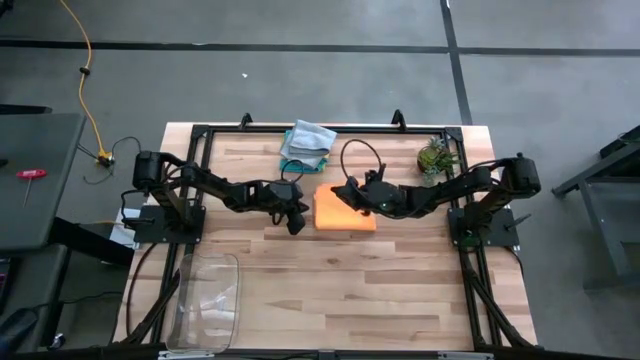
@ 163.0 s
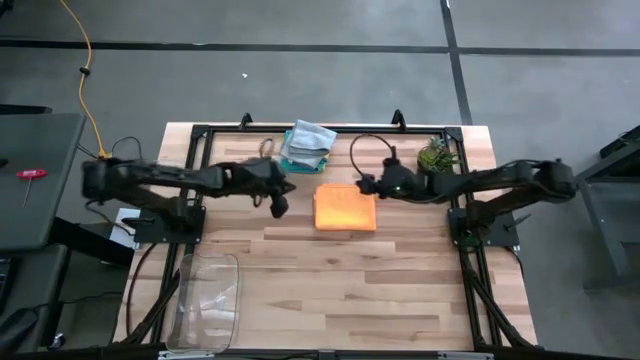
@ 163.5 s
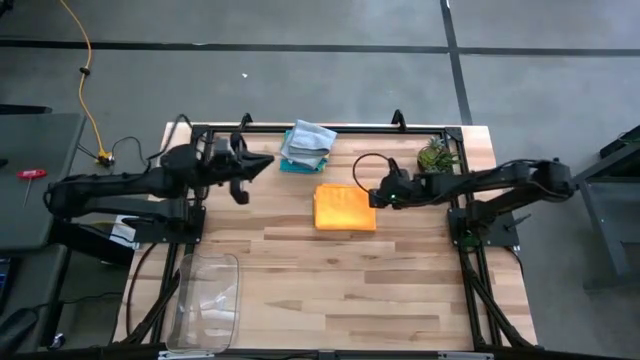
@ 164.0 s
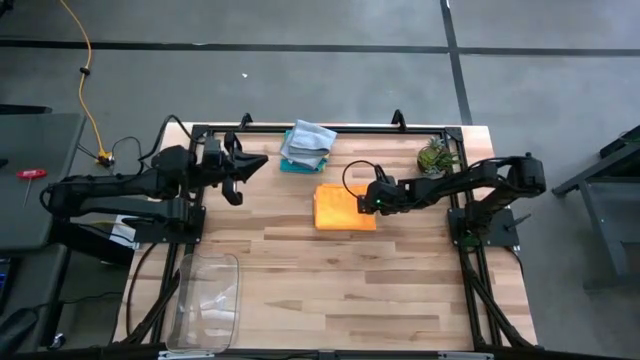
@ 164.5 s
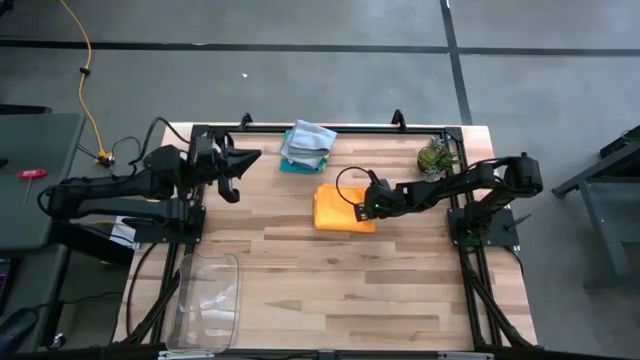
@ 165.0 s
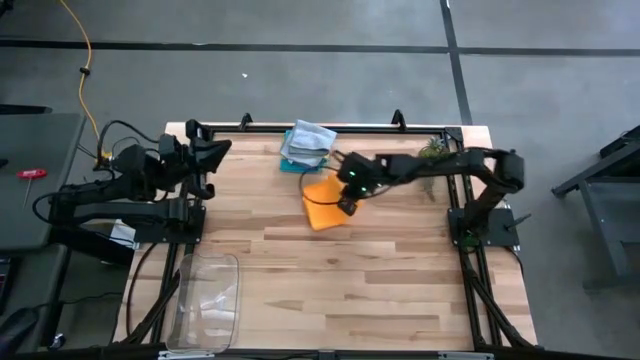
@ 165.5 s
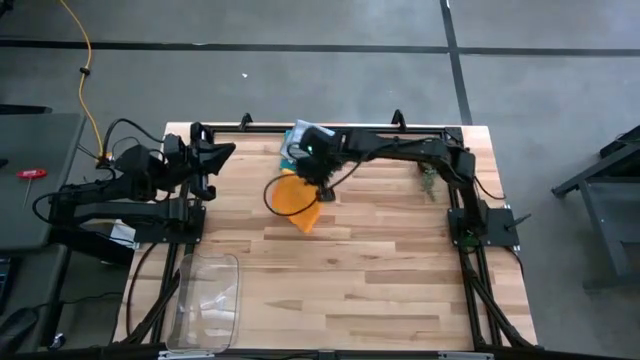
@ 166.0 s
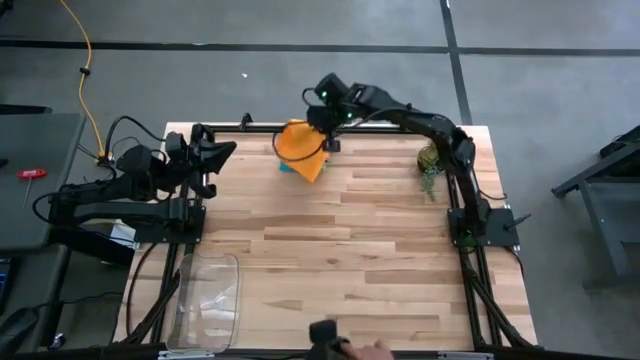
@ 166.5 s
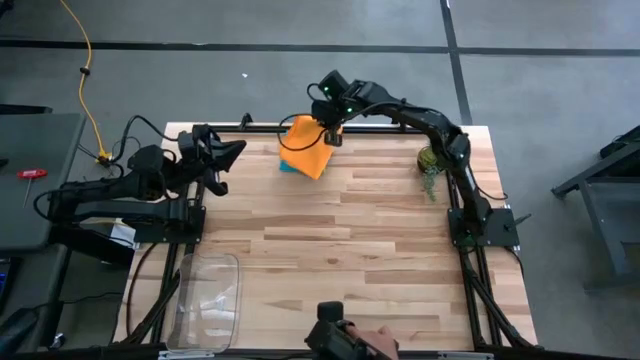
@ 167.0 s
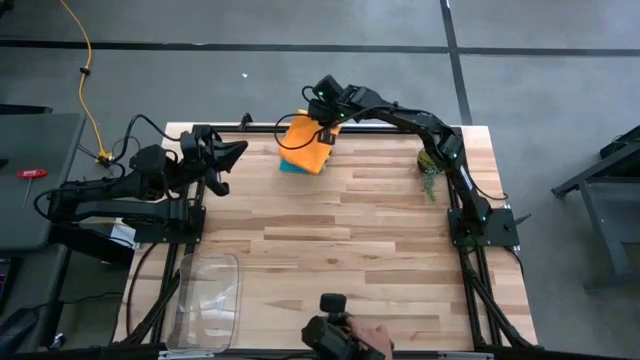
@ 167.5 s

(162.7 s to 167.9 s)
Task: Fold microfiber towels
Stack the orange microfiber towel on the folded microfiber towels

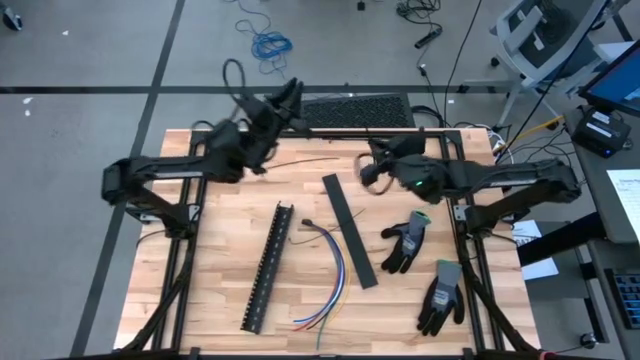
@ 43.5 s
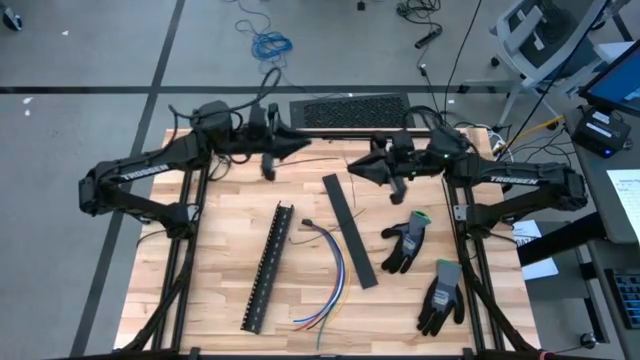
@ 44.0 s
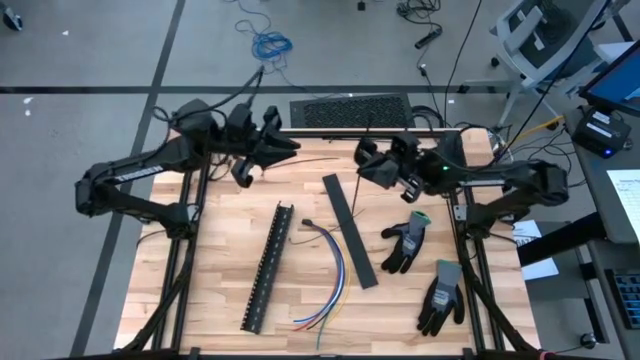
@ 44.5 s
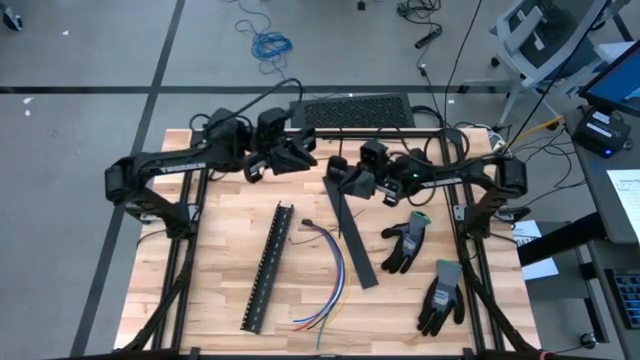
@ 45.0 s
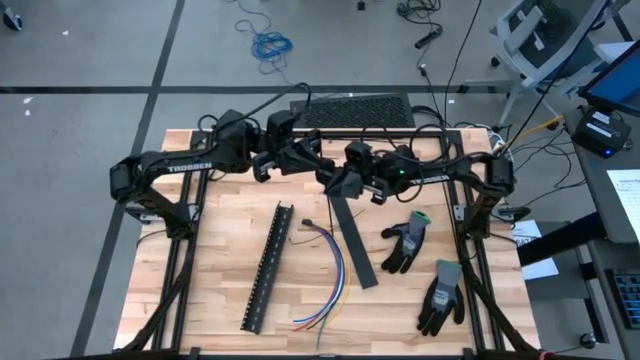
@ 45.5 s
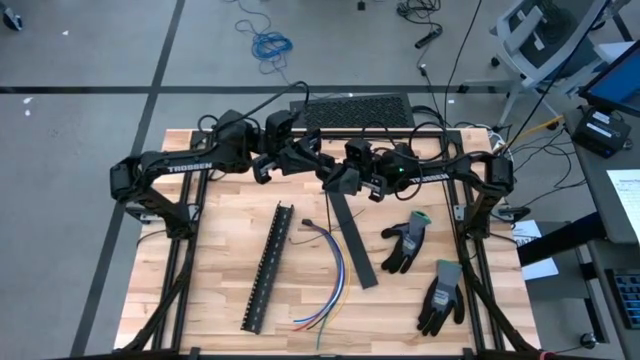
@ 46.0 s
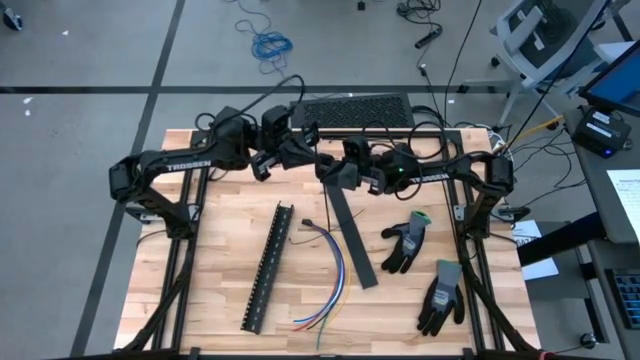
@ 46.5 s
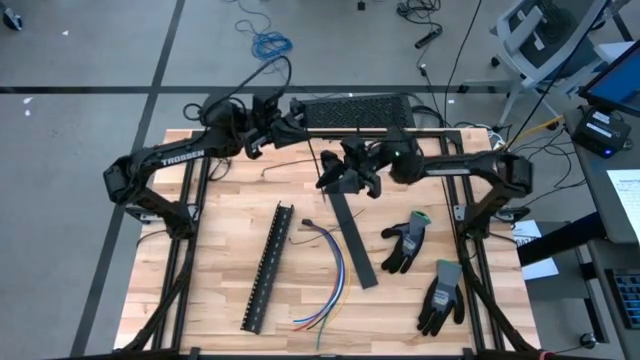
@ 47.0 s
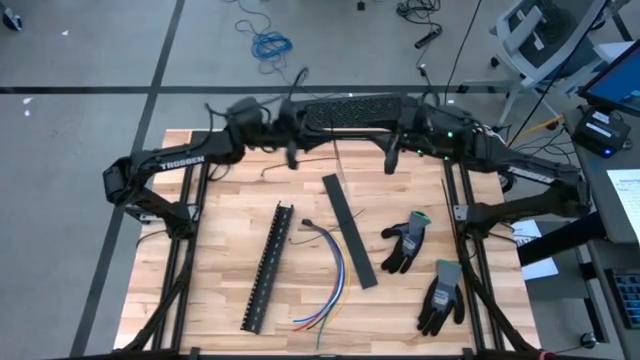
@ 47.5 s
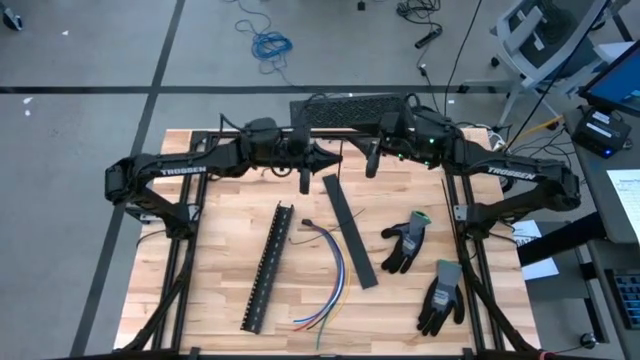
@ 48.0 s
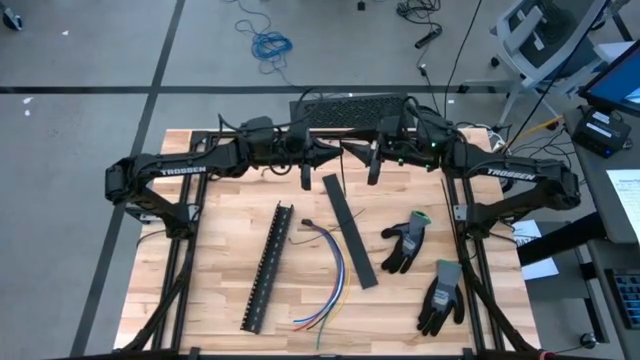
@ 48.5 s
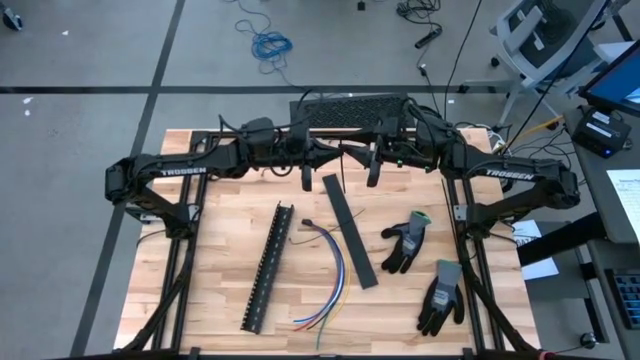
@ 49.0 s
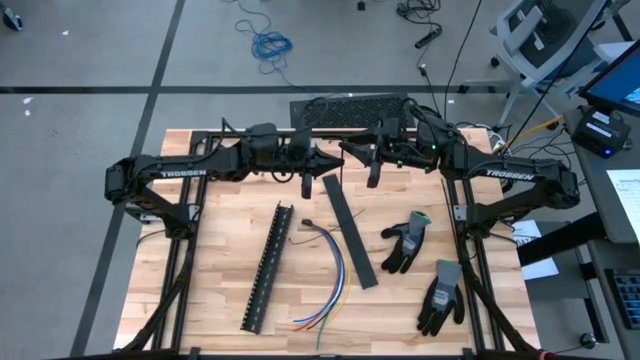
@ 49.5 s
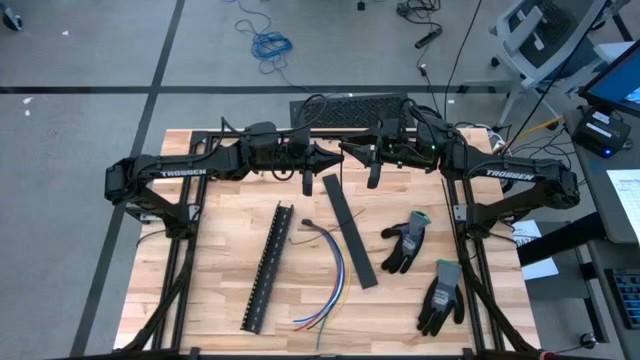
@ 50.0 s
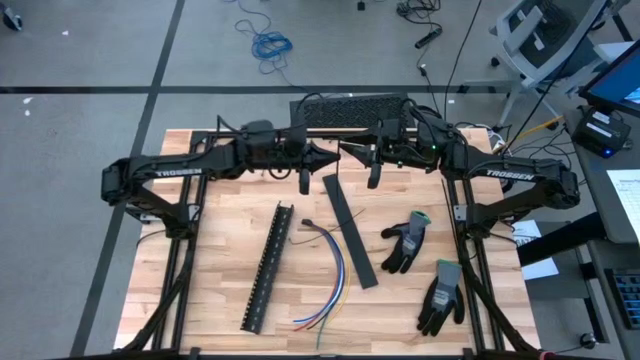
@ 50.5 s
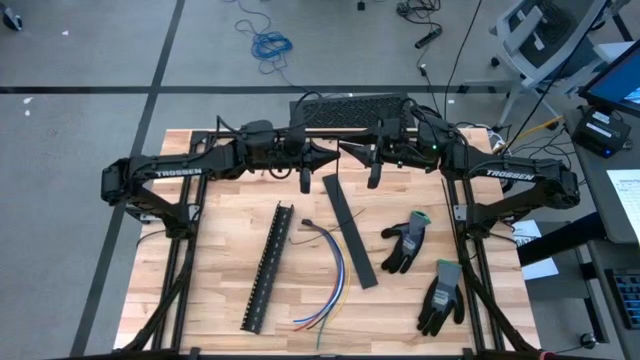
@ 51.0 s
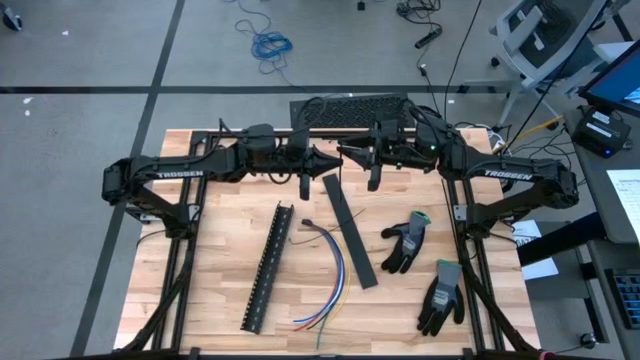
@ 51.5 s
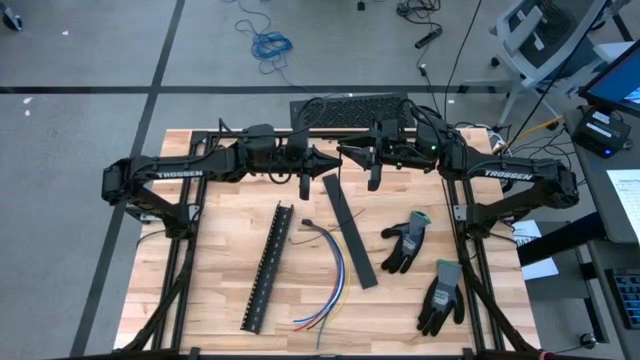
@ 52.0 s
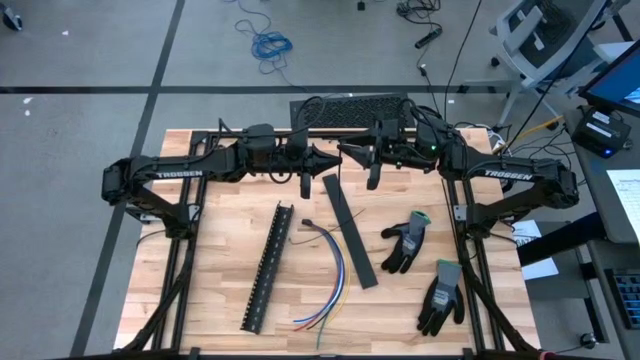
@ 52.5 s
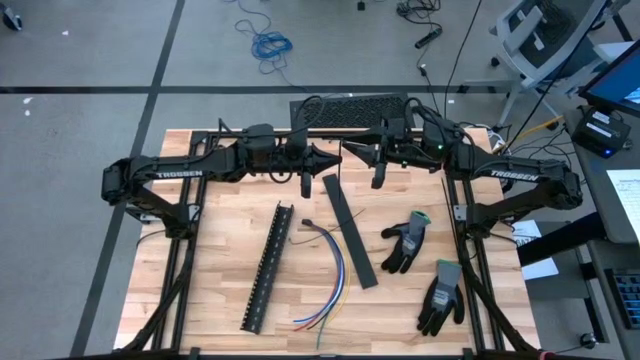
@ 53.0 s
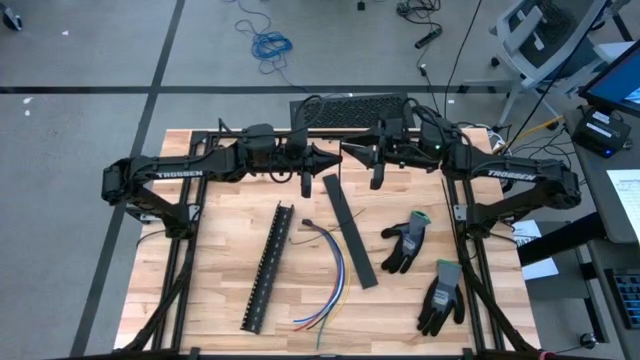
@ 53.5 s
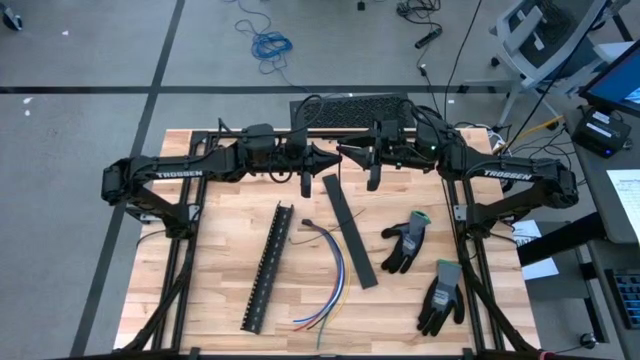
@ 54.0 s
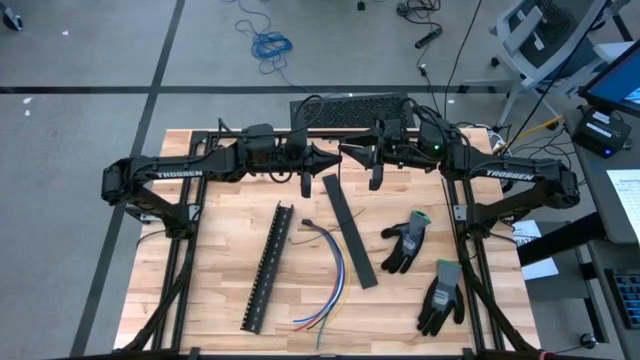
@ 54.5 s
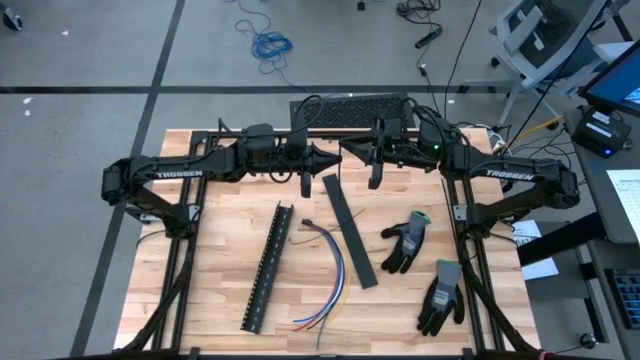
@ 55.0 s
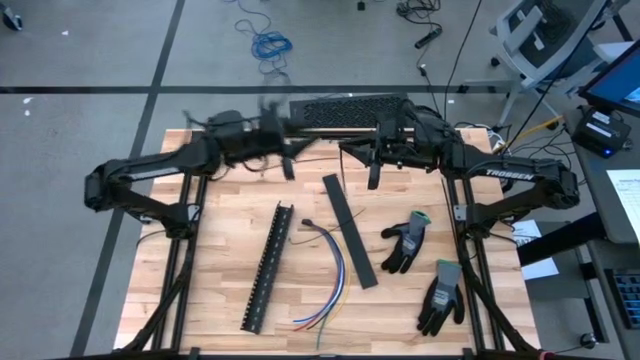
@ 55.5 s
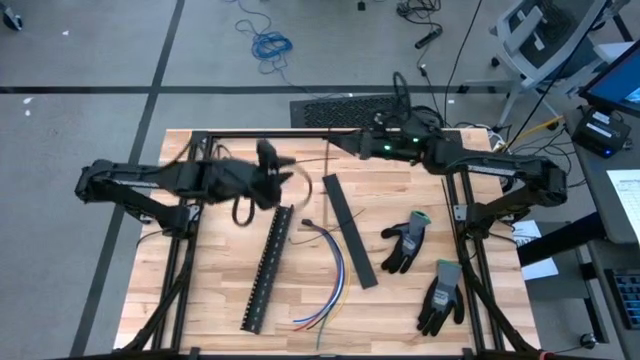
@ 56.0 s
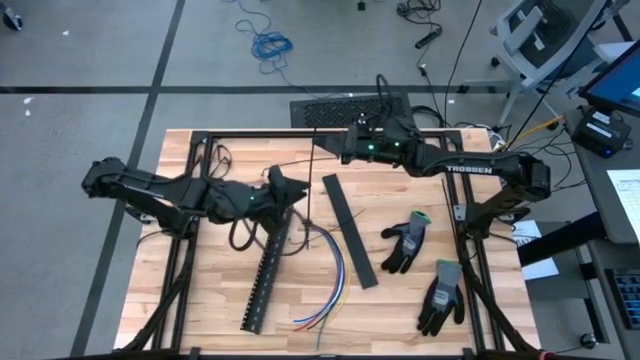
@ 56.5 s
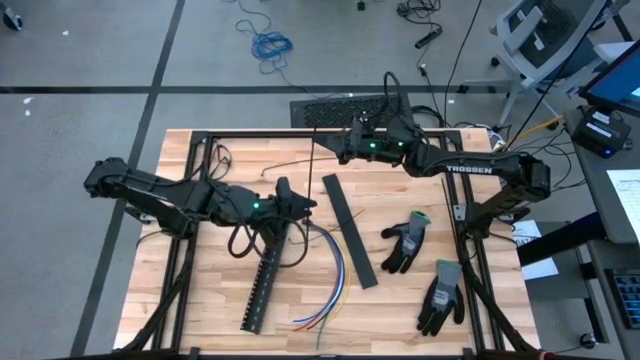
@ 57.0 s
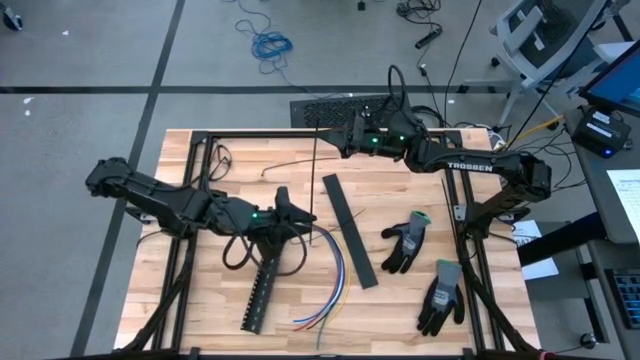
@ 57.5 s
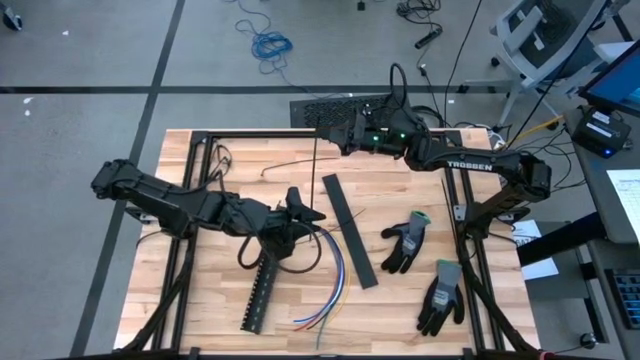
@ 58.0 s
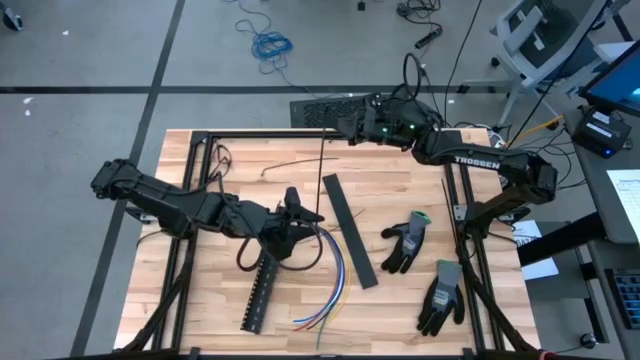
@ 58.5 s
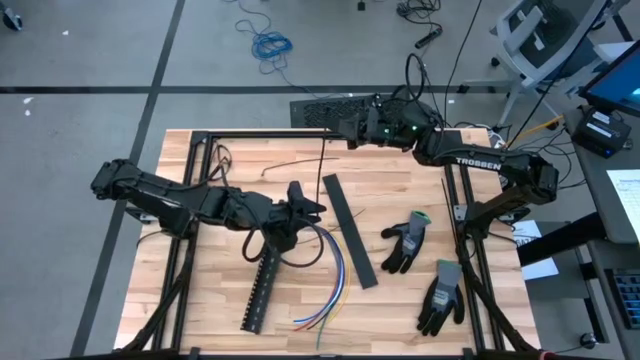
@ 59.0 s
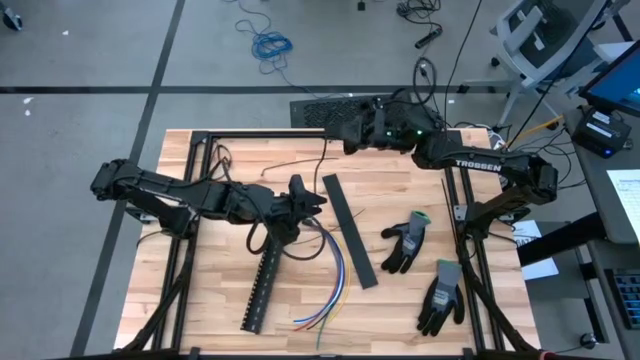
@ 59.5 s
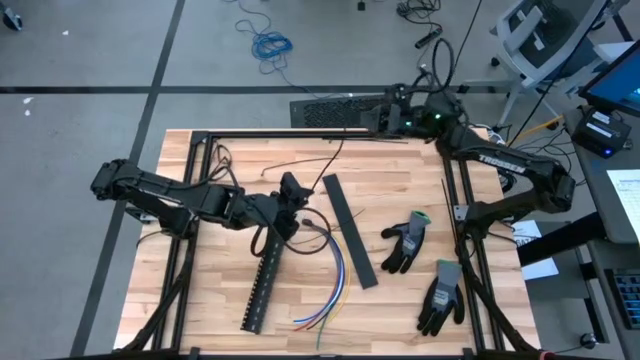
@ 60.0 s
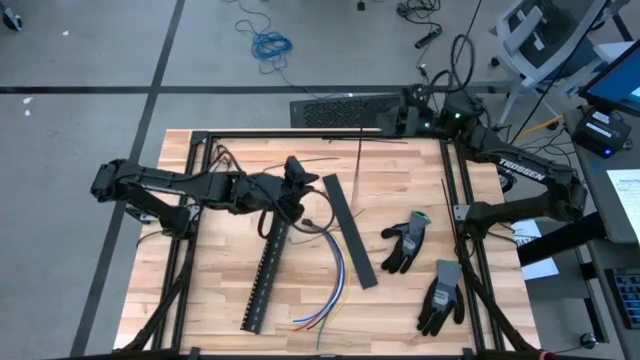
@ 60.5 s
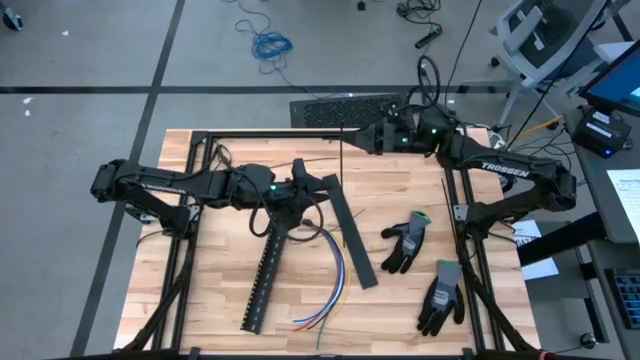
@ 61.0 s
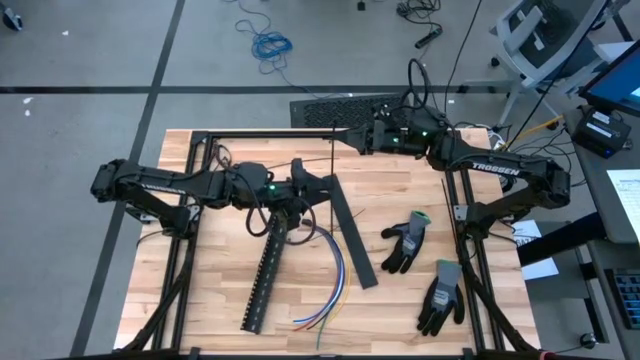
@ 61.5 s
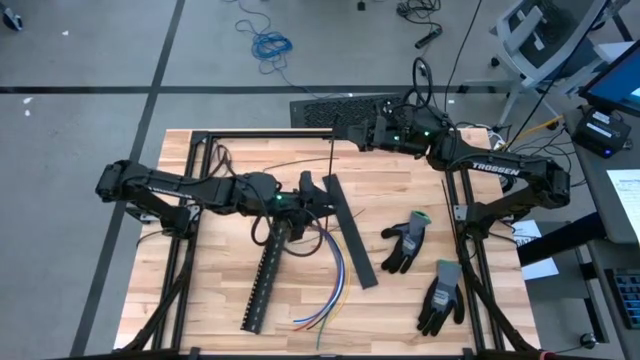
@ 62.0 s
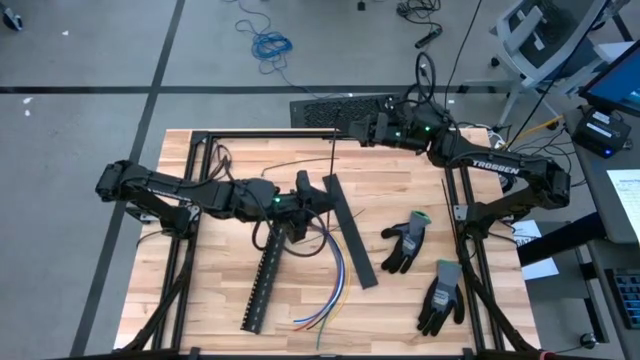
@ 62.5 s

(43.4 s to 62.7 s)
Task: Ziptie cables
Wrap the black zip tie on the cables
